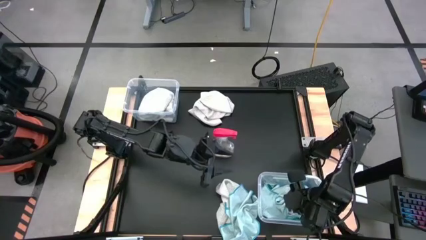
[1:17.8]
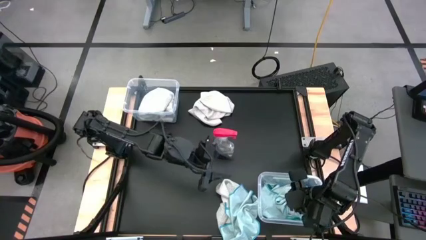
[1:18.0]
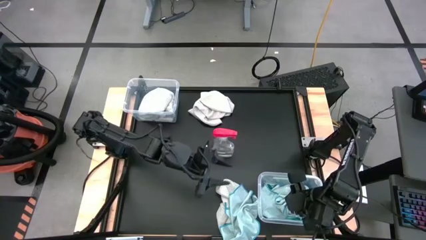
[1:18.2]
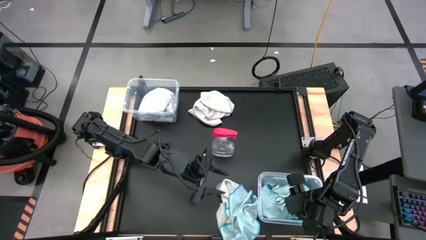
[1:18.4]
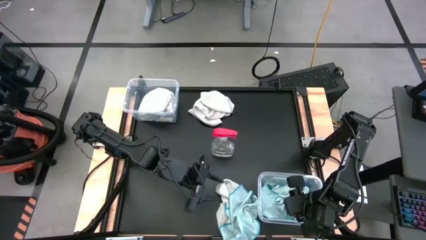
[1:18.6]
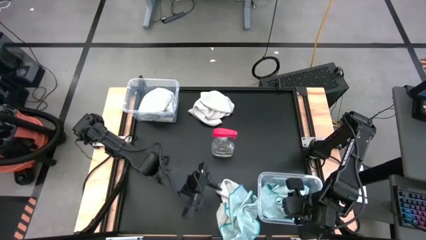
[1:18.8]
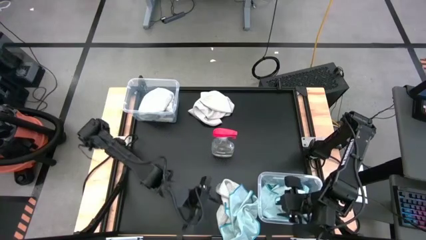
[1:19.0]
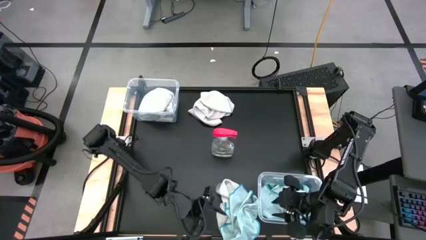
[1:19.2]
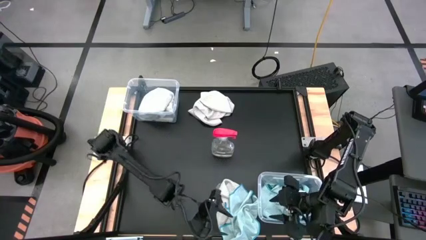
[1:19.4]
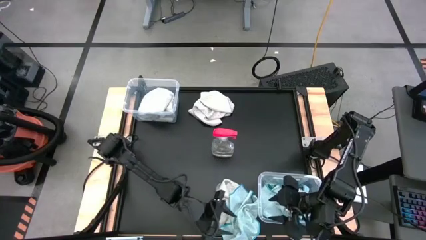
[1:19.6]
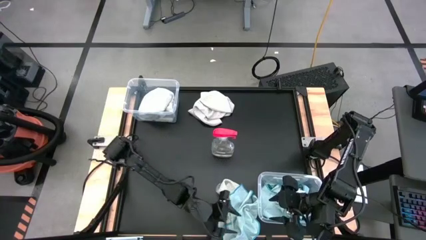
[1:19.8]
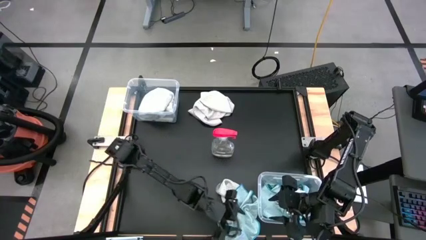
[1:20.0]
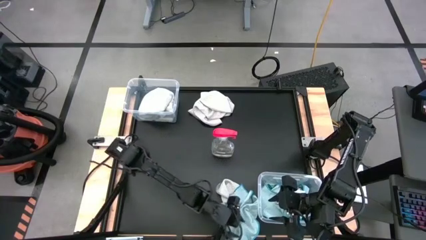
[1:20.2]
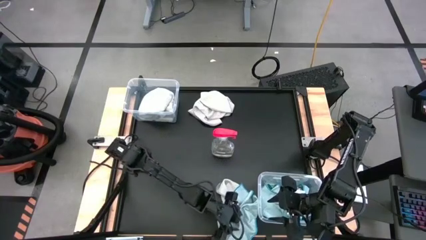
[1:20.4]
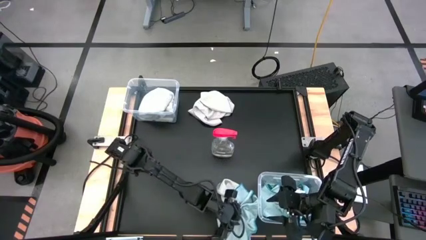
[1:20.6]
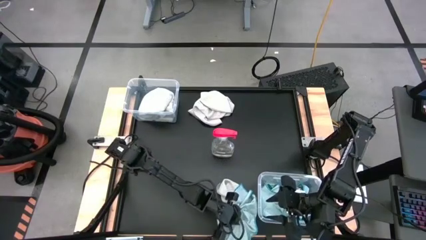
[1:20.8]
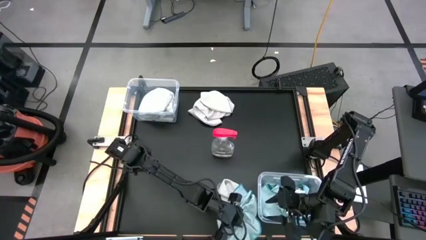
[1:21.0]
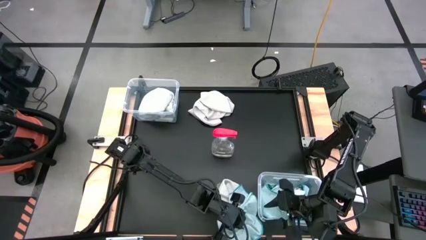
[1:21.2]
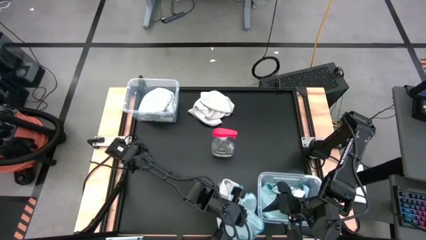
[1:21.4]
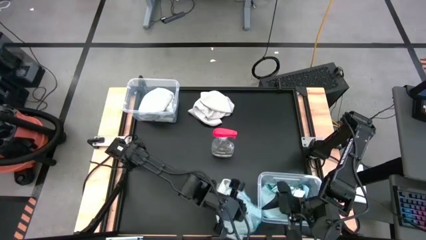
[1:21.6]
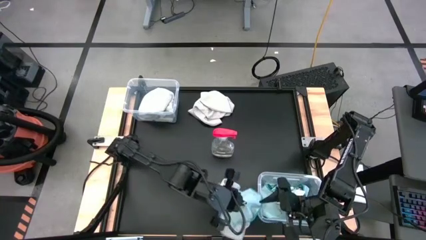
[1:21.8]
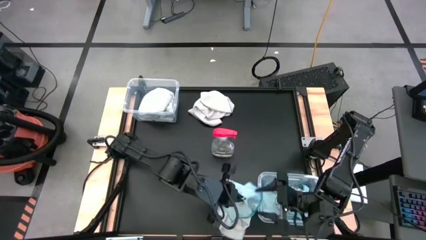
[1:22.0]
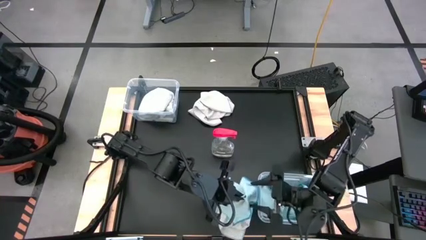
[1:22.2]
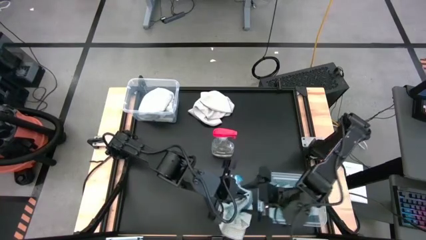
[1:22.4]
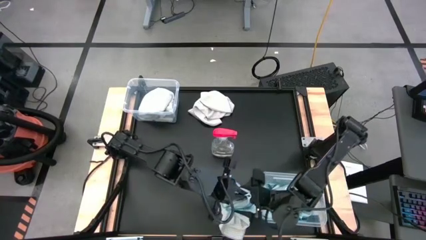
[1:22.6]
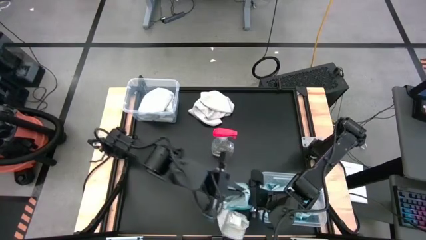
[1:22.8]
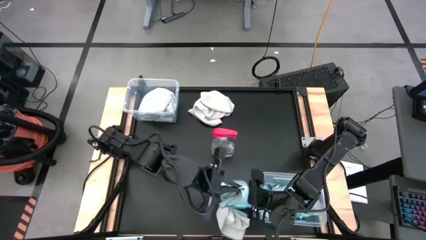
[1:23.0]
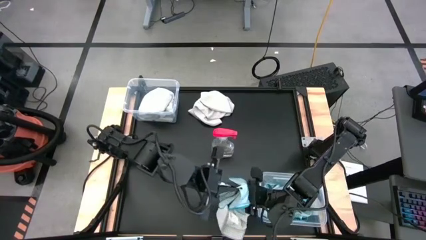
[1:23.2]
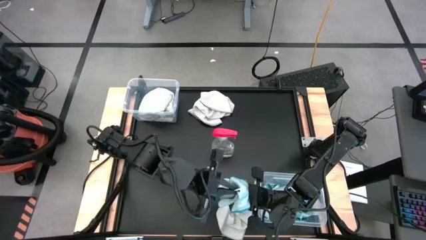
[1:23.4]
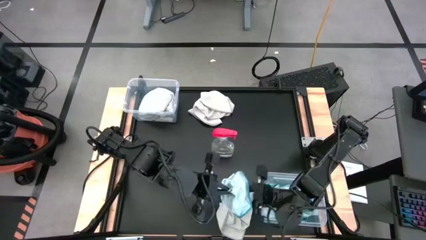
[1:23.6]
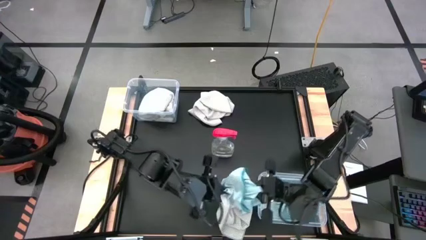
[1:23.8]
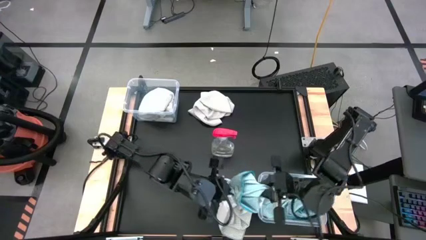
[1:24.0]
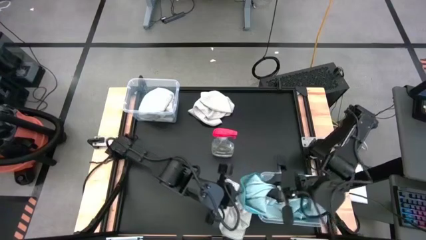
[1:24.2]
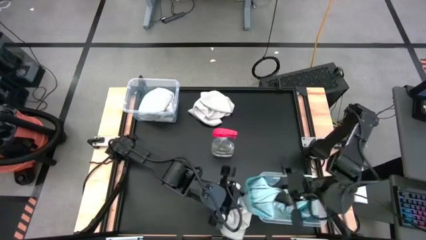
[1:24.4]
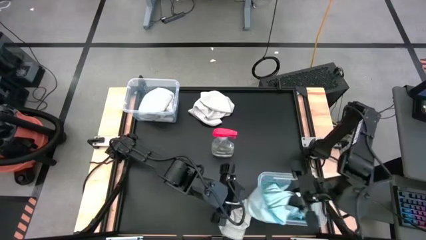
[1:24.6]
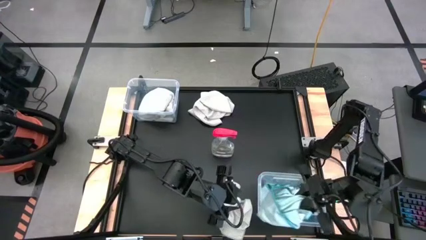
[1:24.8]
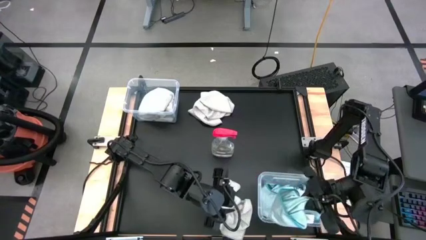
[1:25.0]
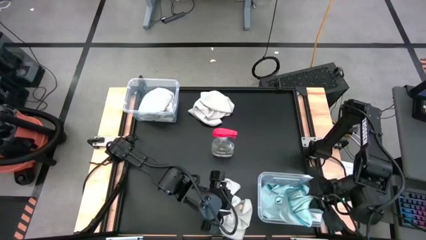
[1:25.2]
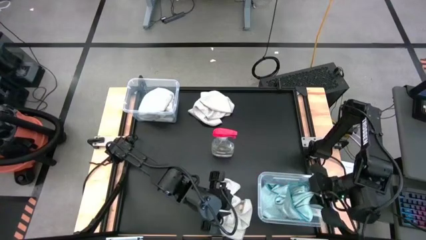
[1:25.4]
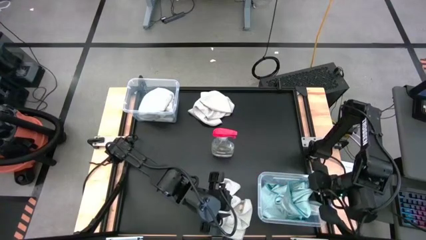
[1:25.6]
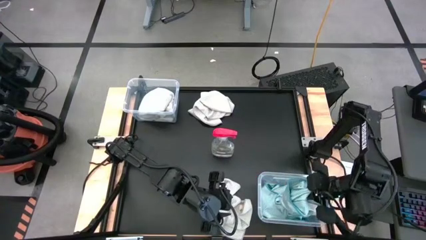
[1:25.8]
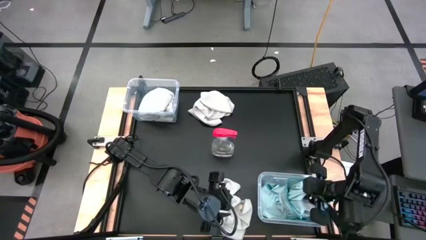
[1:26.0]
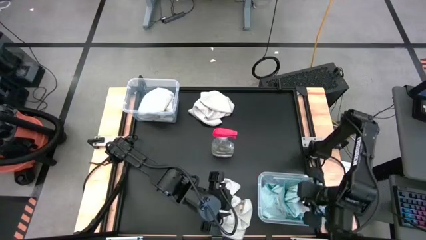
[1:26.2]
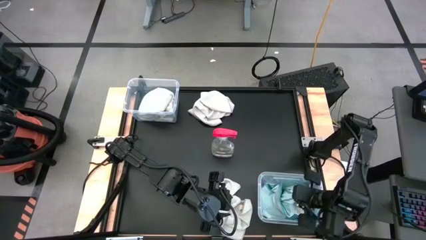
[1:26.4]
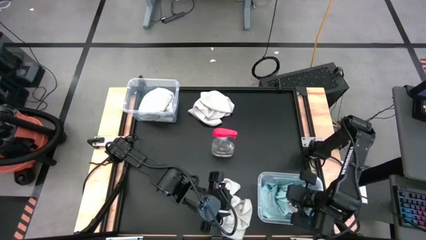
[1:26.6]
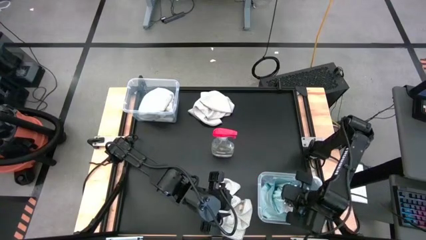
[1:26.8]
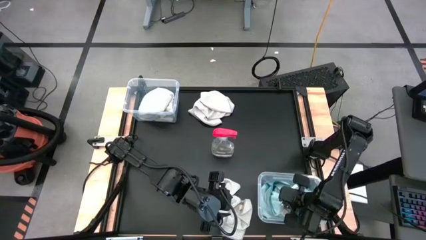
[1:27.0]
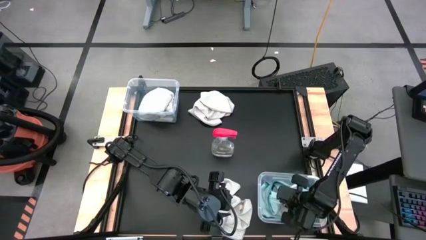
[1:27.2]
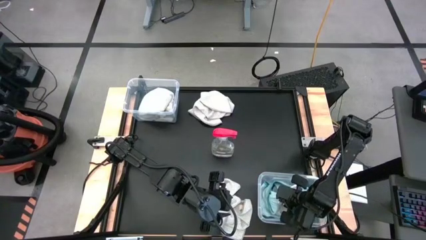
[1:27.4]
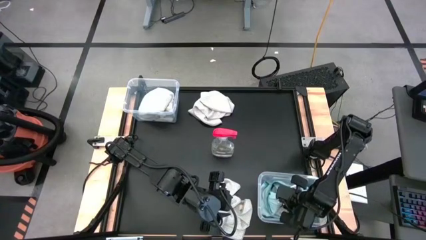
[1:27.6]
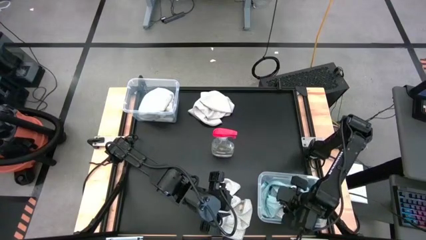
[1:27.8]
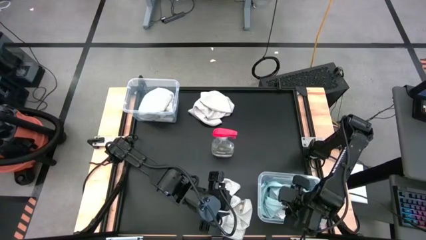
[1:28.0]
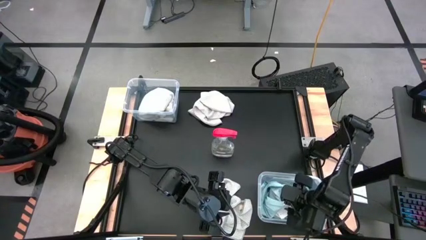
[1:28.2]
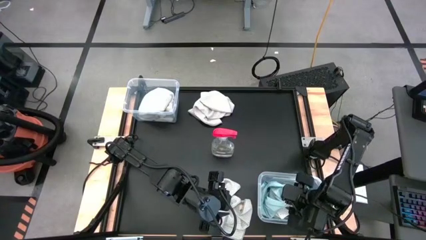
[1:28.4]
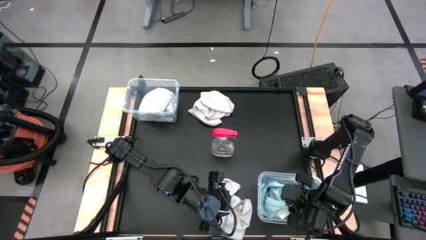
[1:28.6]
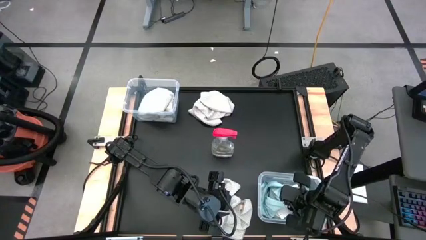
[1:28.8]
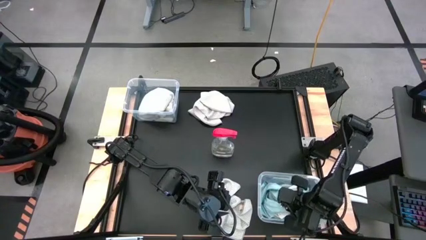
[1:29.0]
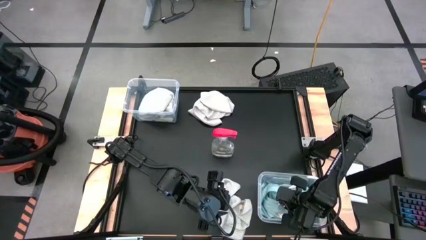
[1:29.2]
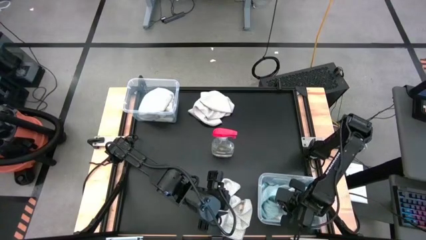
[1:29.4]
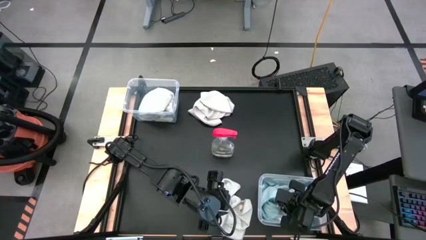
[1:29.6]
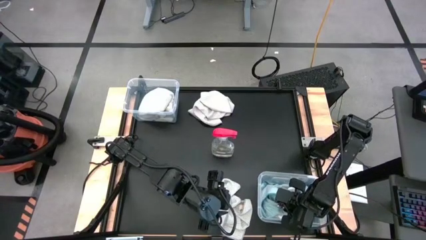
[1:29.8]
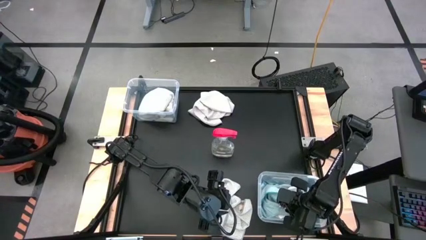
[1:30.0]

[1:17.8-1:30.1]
Task: Sort microfiber towel by color & place in baskets
Put the blue towel into the bottom transparent bin

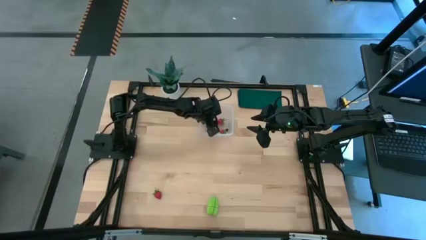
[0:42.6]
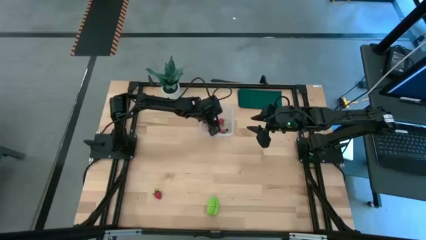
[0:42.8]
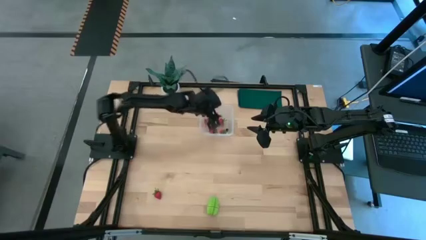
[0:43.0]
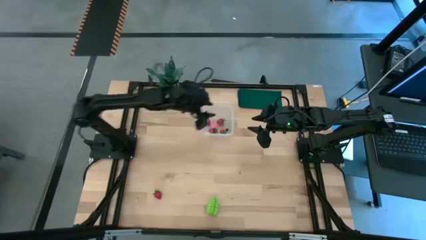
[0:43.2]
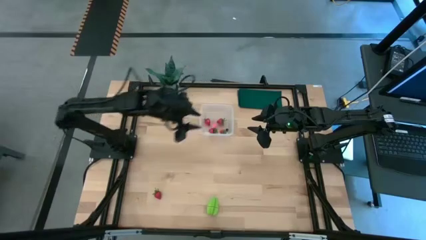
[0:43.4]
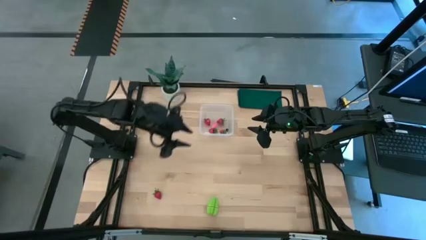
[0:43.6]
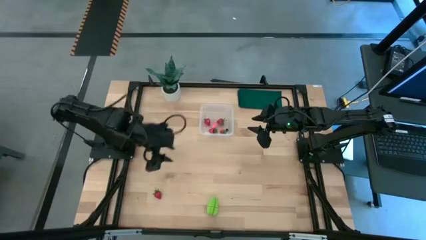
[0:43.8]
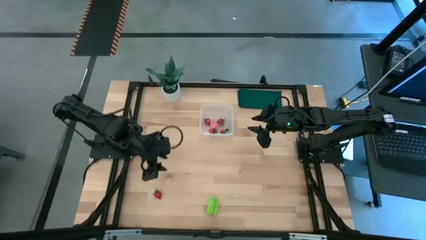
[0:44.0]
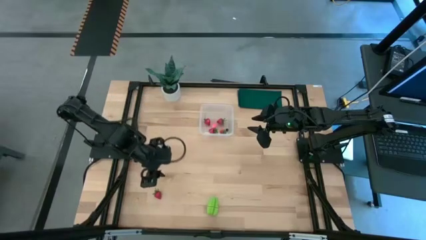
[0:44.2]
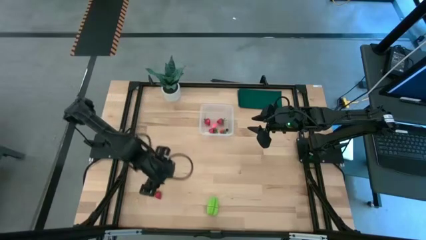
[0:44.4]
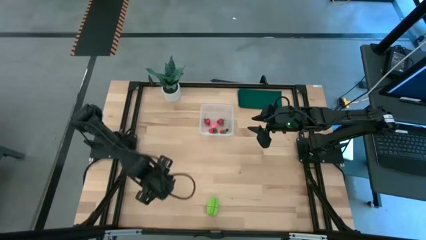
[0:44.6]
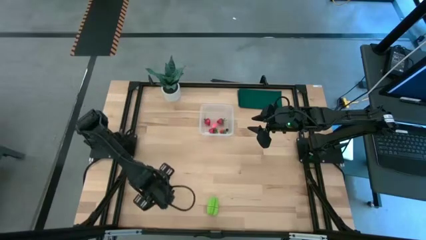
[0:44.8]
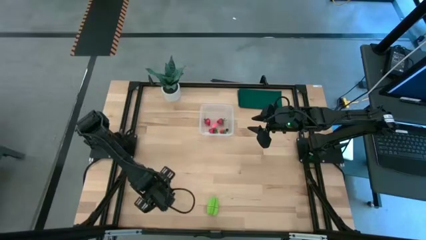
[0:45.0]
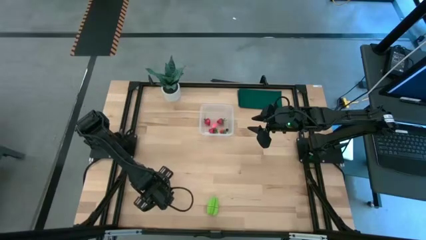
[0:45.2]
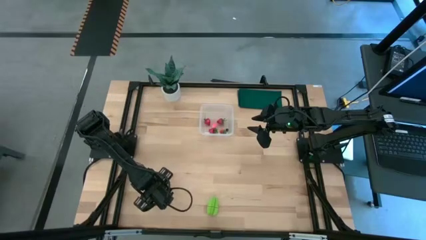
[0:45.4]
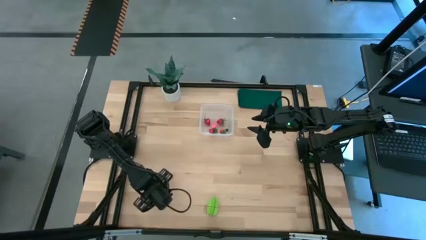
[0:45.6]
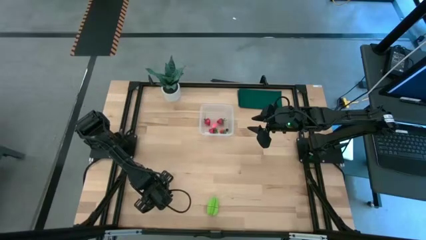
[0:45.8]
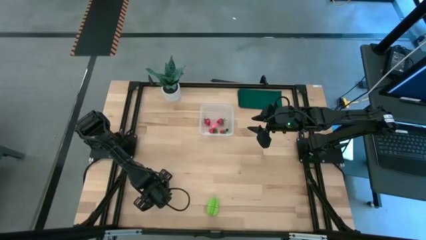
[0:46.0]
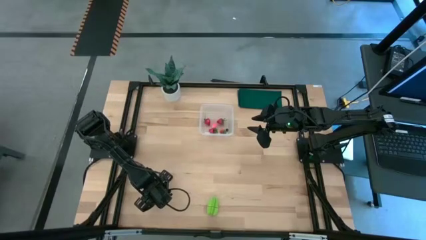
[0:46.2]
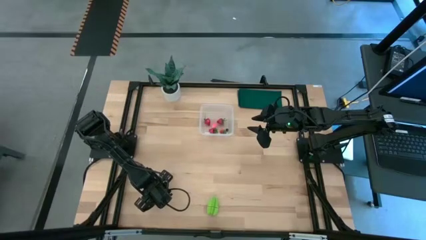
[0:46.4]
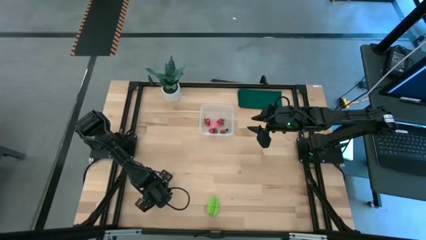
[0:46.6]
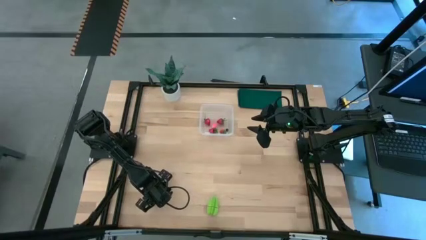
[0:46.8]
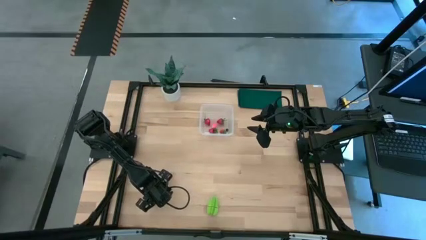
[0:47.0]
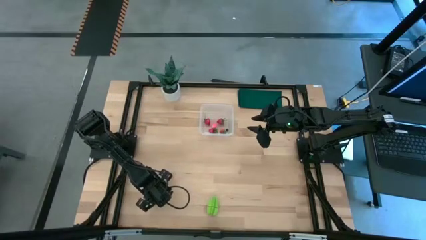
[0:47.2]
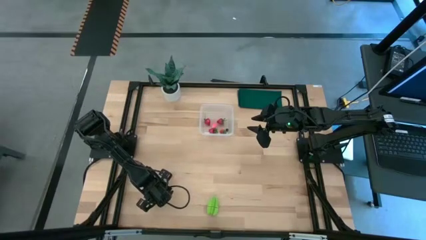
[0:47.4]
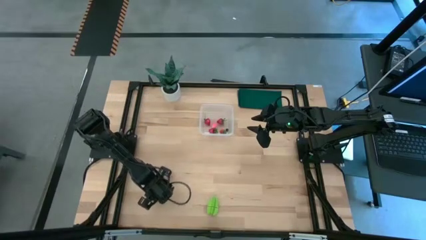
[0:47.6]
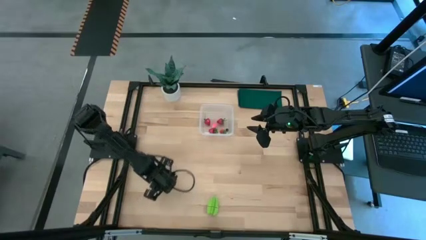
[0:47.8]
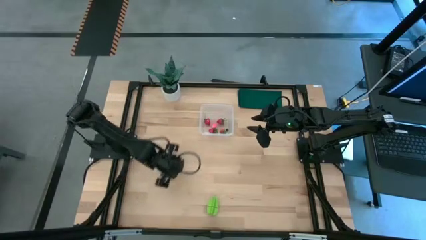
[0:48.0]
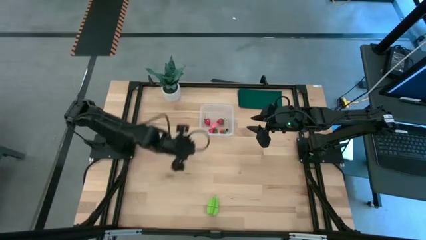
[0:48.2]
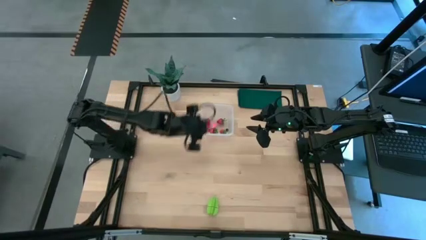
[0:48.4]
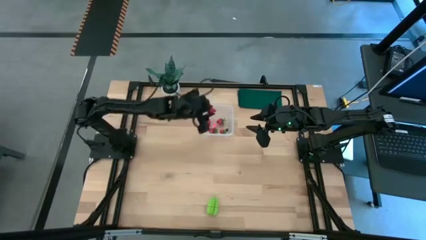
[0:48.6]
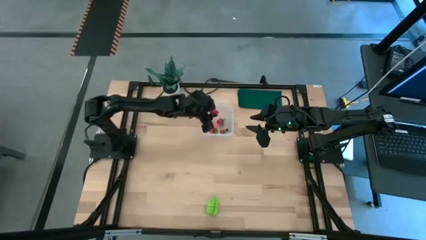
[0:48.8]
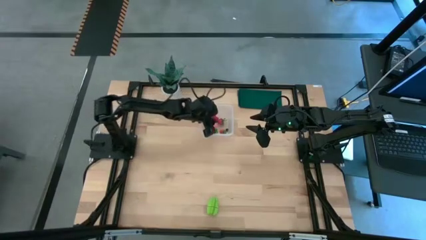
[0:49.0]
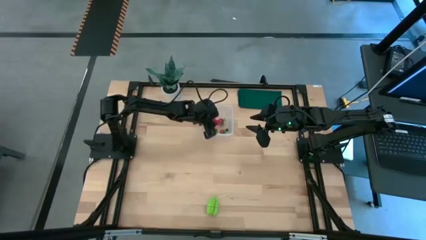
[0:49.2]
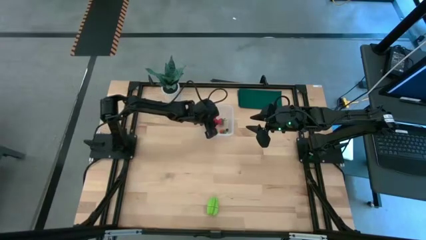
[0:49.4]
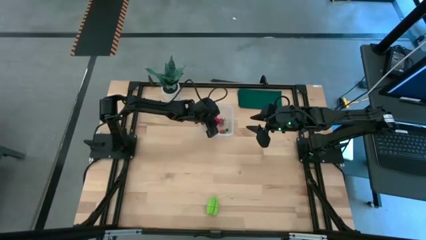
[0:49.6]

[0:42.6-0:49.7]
Task: Pick and placing Produce into tupperware
Put the strawberry into the transparent container
